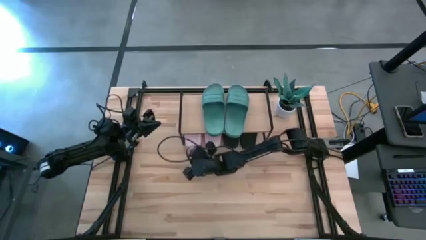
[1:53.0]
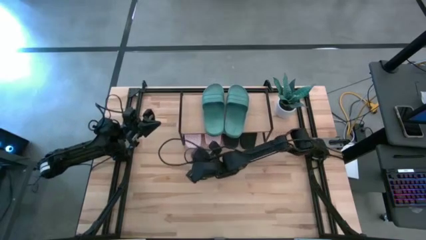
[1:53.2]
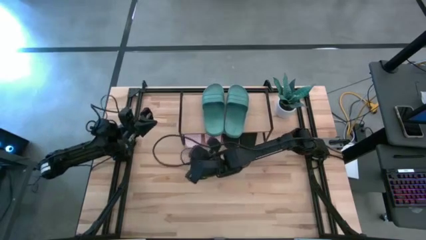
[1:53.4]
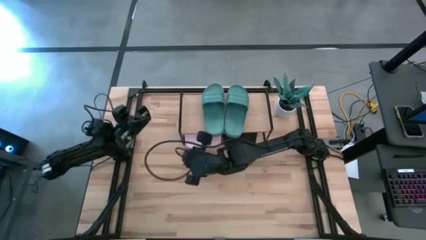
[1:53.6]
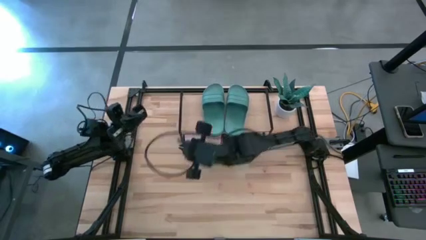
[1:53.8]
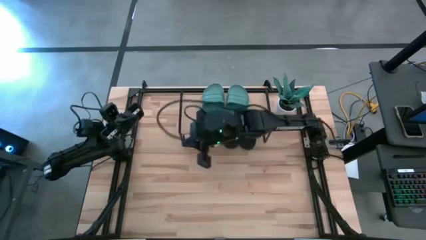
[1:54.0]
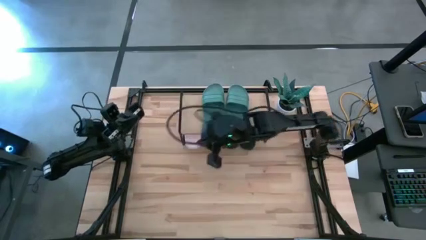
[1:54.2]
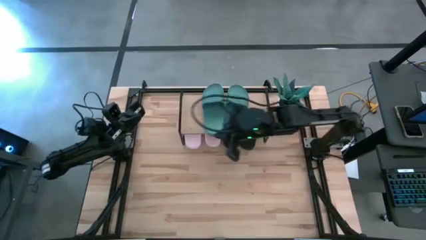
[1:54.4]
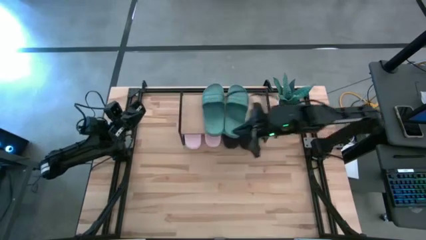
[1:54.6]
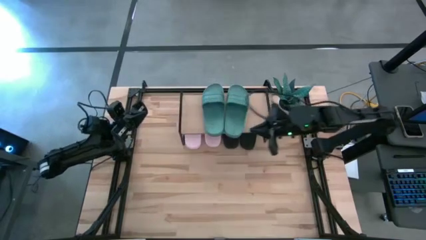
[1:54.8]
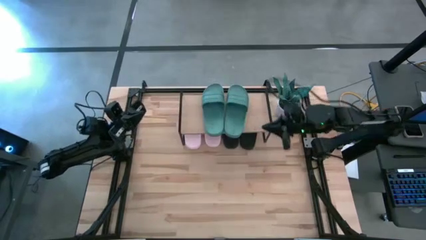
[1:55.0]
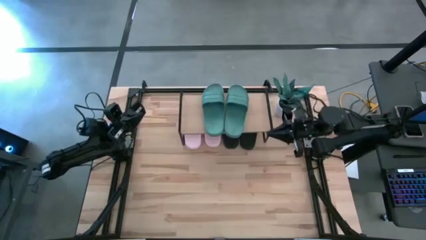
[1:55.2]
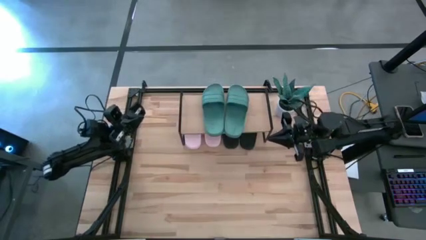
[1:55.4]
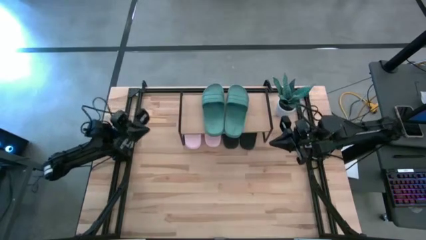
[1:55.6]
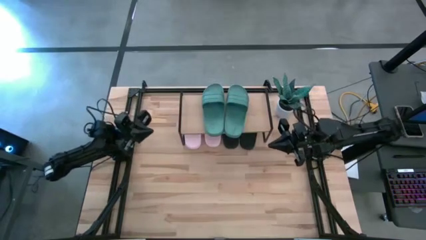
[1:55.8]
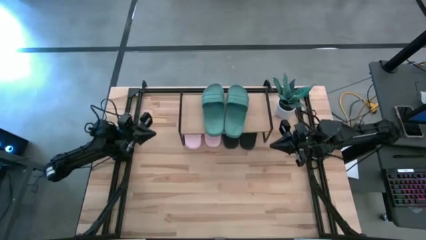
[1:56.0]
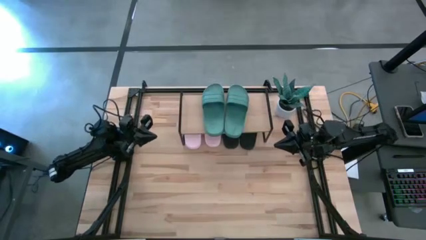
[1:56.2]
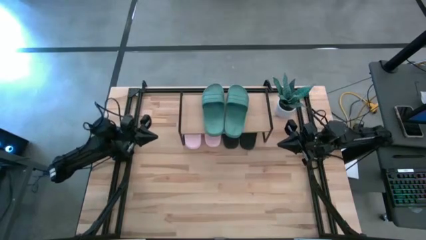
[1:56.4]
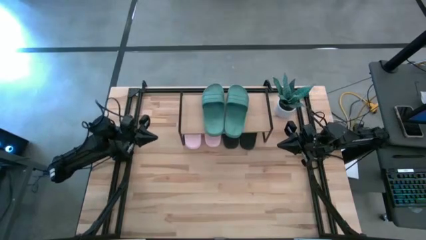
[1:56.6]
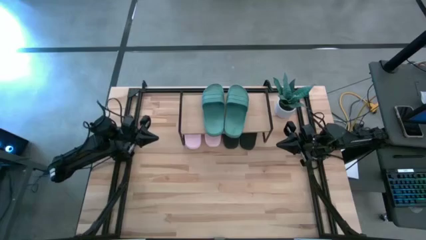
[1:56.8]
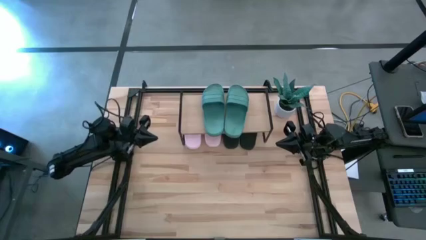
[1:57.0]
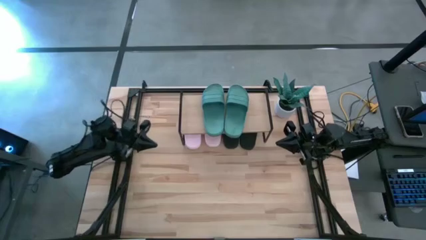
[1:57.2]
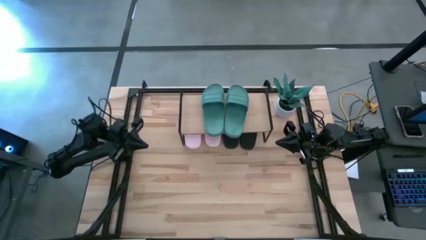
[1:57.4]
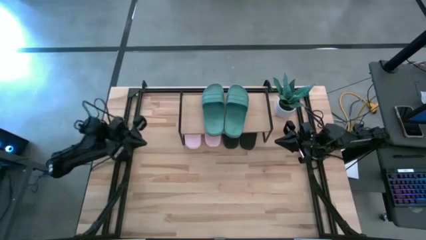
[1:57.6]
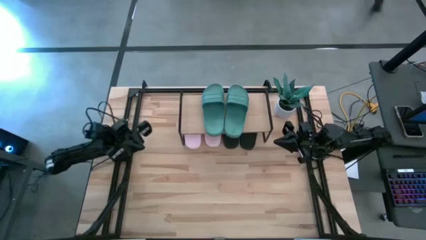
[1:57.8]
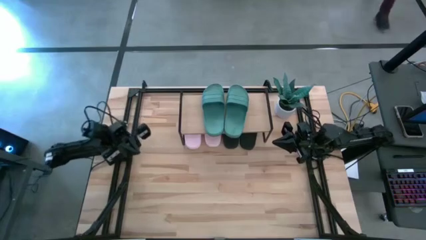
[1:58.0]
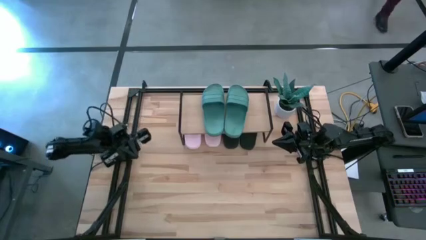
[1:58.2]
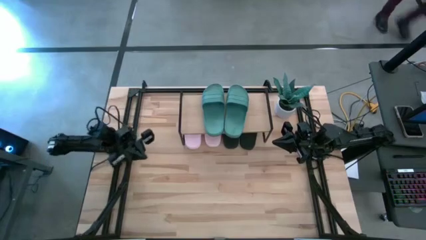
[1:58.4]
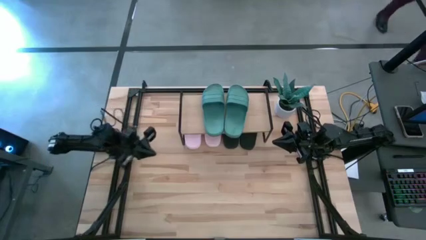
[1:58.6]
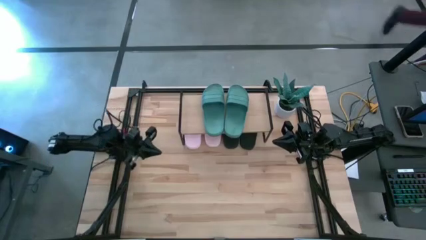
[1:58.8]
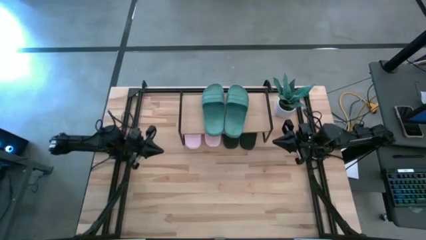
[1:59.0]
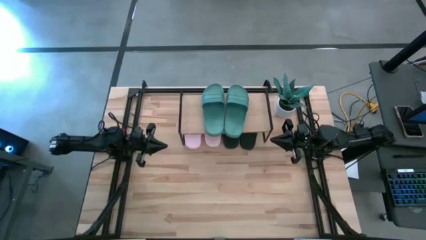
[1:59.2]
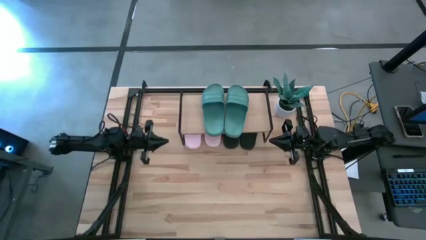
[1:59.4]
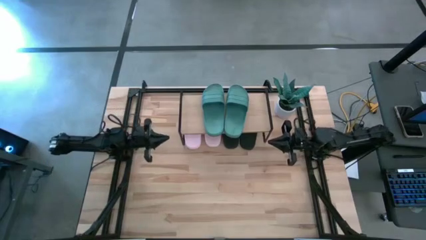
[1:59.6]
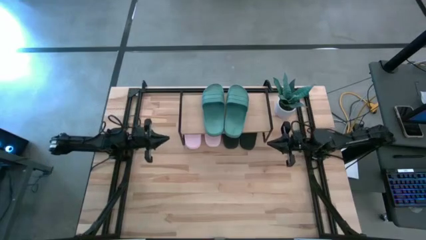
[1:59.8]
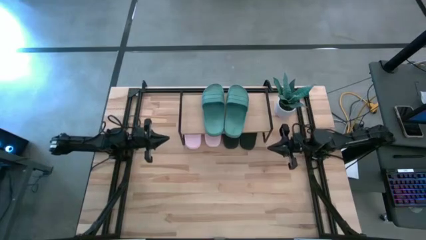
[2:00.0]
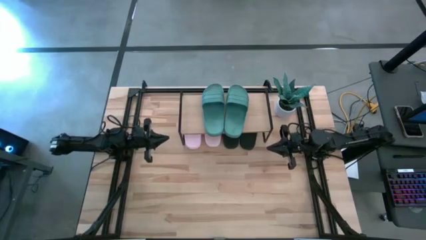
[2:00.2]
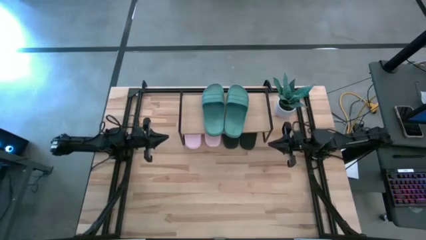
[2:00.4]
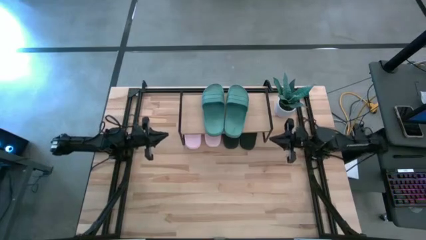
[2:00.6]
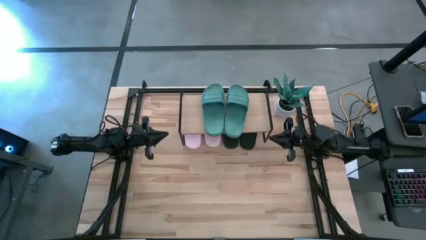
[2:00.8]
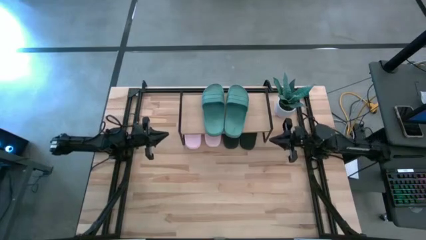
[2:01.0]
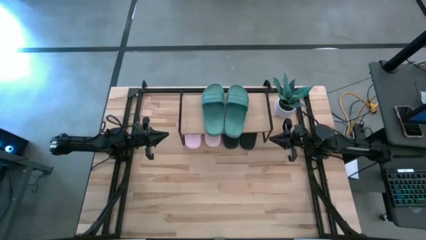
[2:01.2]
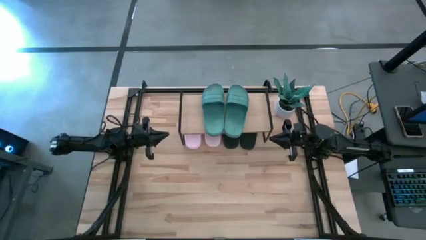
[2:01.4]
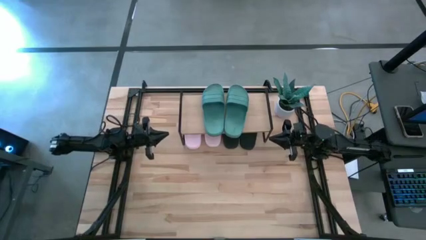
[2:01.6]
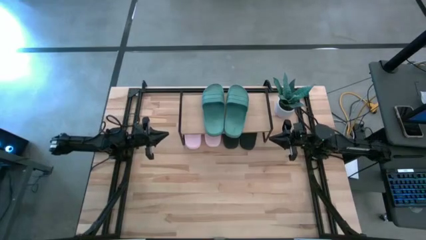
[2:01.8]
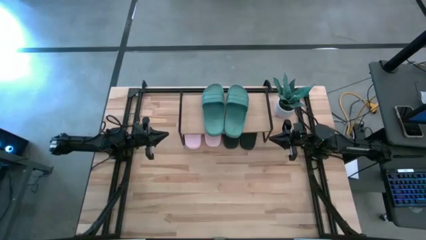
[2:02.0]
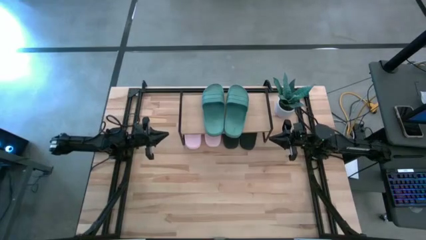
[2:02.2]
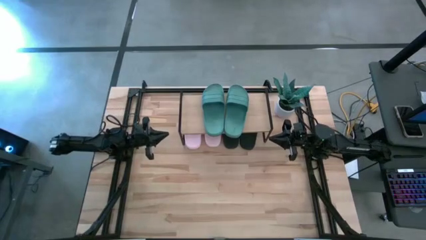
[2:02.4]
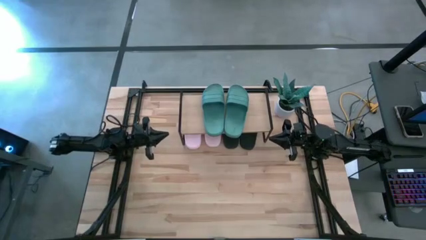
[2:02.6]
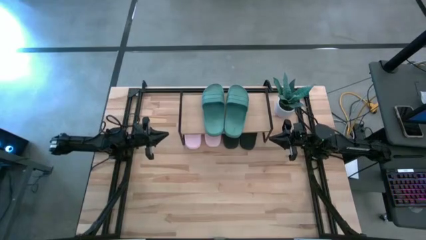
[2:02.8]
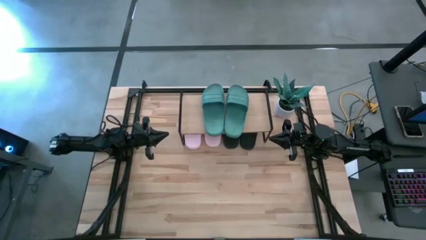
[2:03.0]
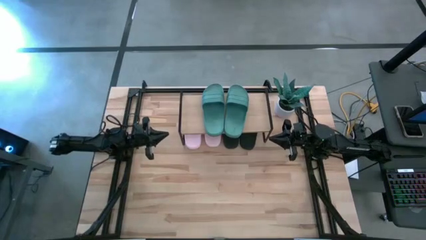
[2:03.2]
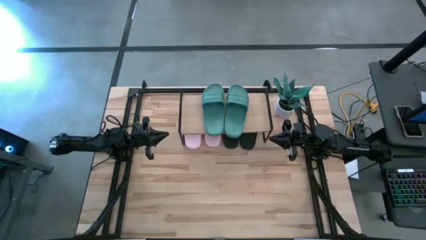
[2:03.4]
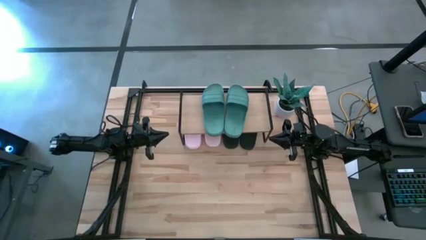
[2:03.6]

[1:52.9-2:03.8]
Task: Pick and place slides into the shelf
Return to Home Position

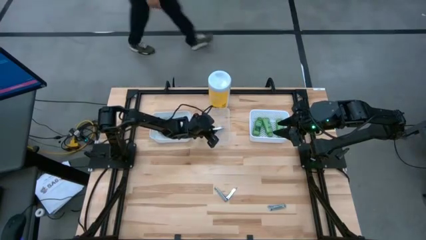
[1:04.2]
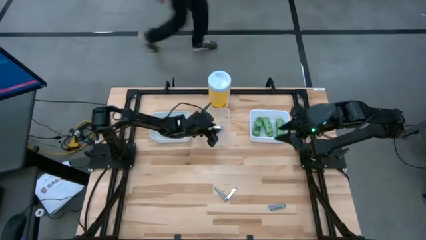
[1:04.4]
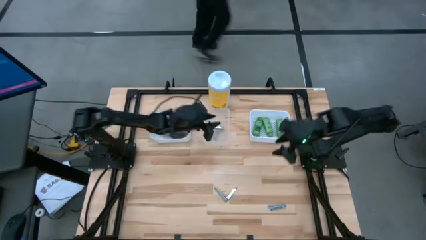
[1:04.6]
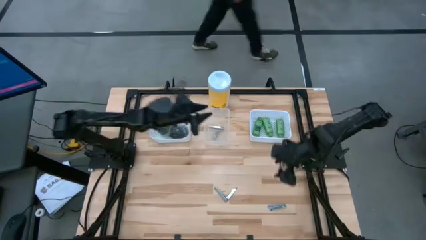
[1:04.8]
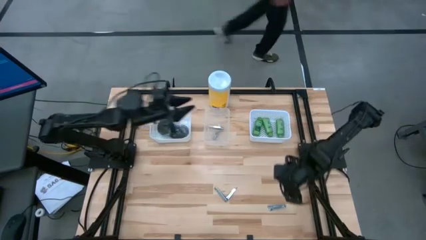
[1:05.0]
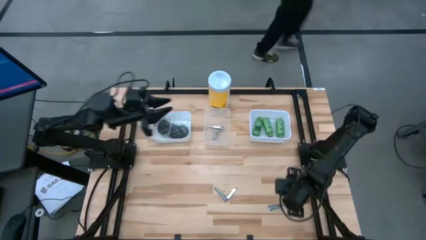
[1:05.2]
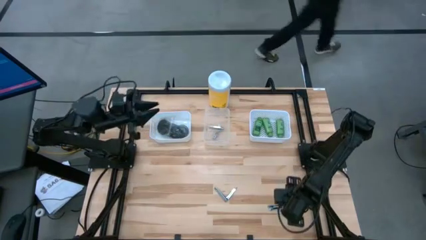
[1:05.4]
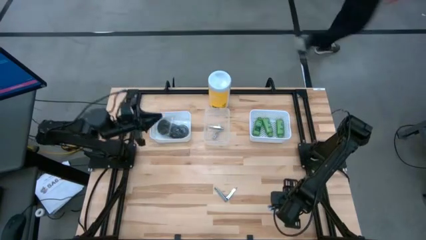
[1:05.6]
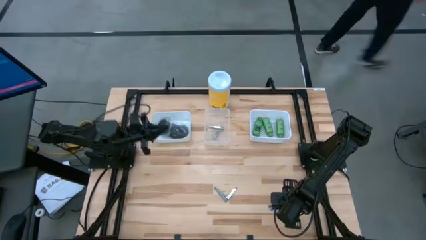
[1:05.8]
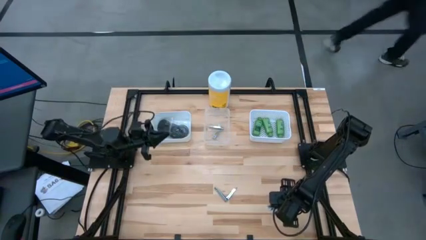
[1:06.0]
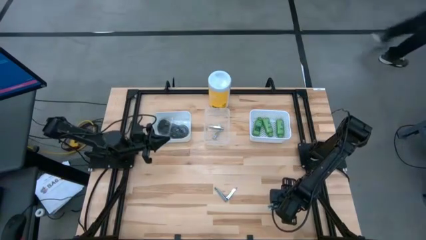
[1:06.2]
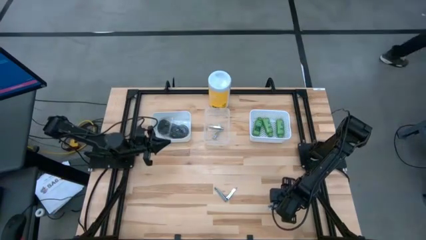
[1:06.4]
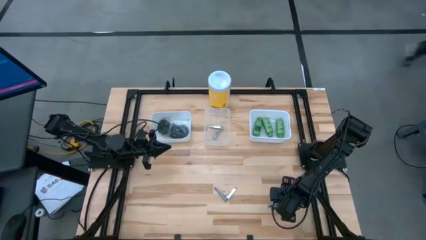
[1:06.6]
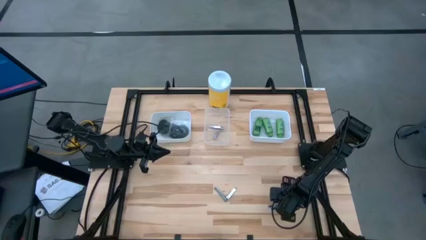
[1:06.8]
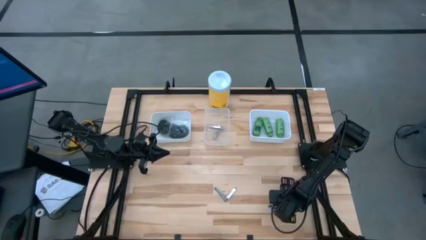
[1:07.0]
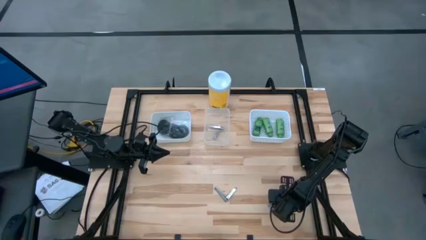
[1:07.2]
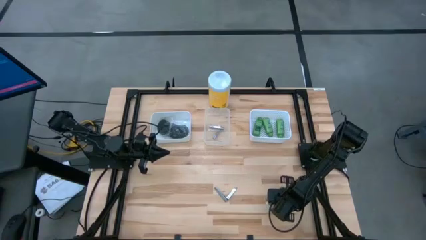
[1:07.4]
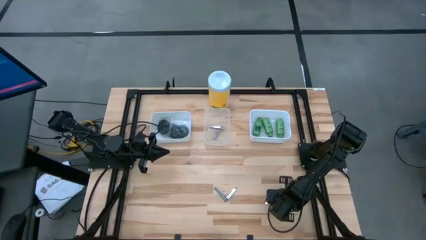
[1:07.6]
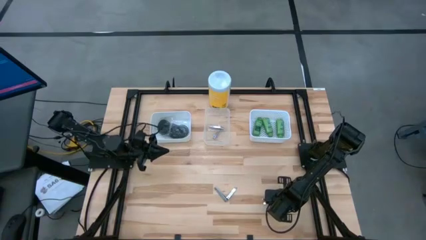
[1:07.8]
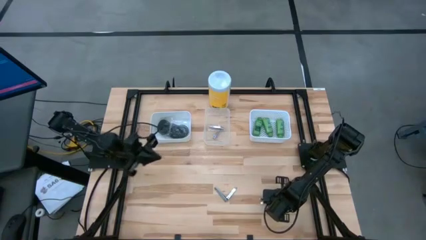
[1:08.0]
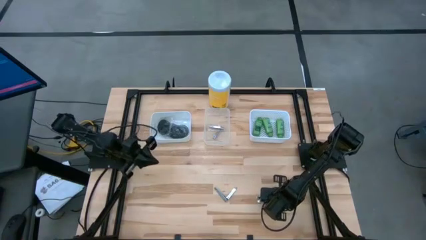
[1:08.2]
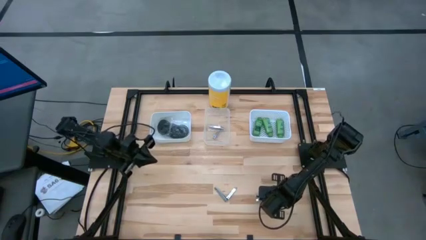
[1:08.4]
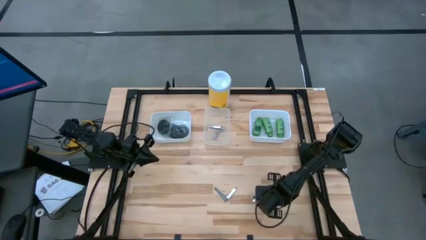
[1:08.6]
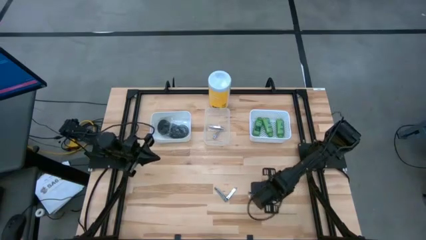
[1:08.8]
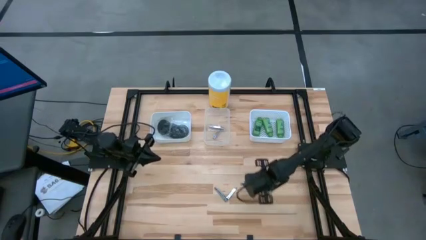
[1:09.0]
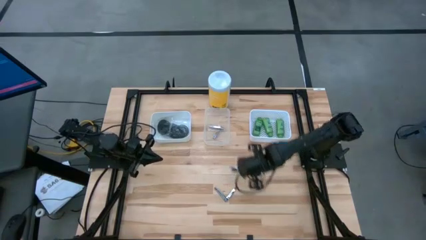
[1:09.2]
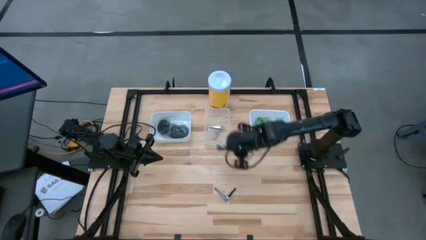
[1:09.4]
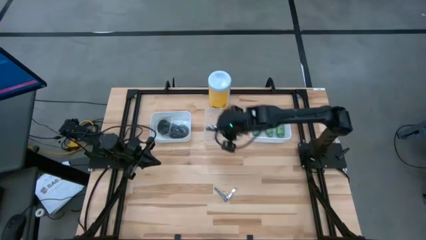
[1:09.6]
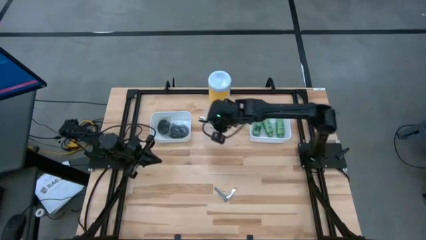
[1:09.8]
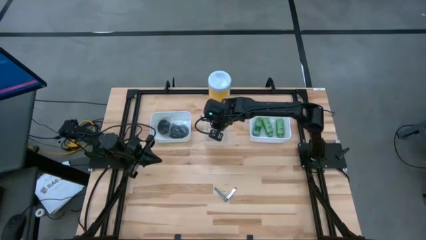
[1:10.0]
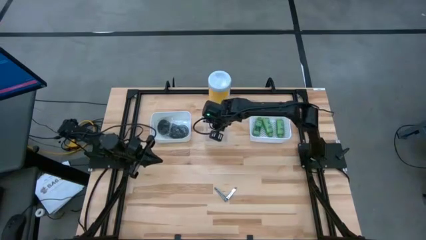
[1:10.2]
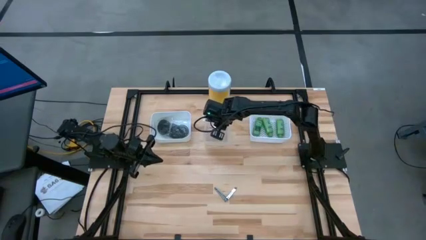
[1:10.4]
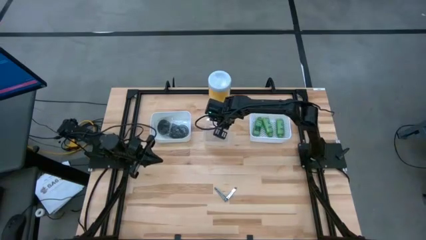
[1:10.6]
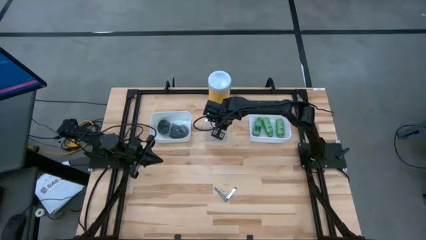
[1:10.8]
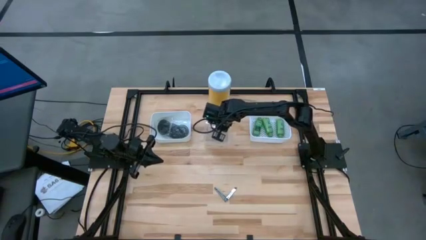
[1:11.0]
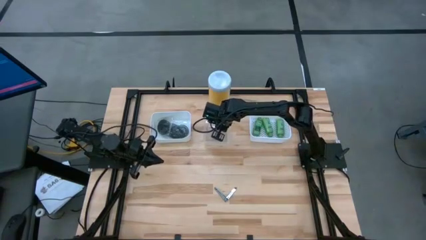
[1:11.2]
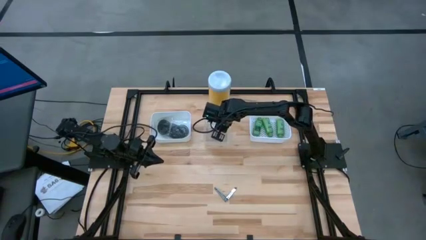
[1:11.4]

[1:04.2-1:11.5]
Task: Pick & Place Travel size toiletries
Put the silver nail cutter into the transparent bin
